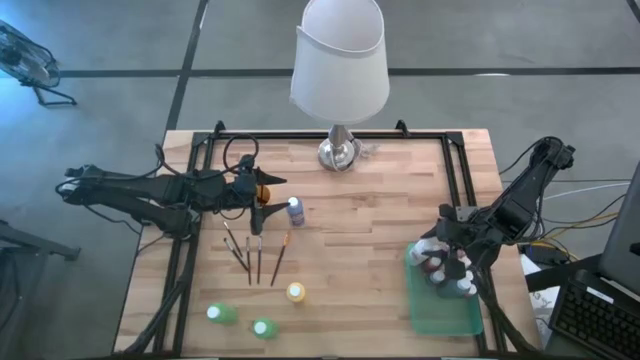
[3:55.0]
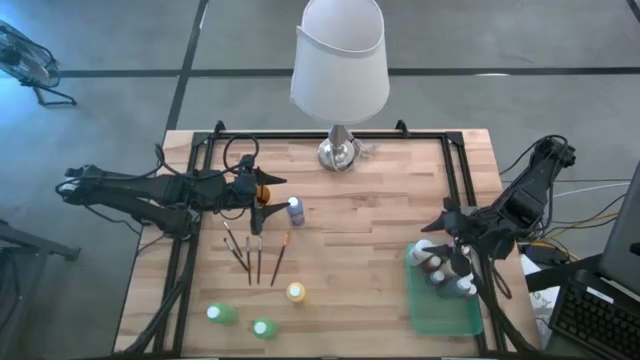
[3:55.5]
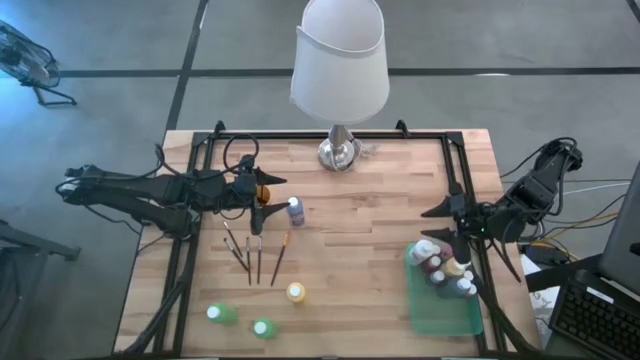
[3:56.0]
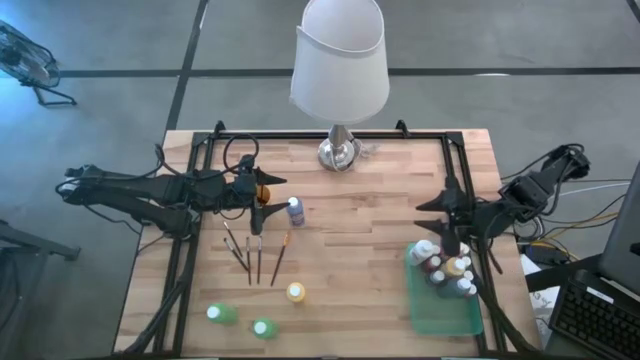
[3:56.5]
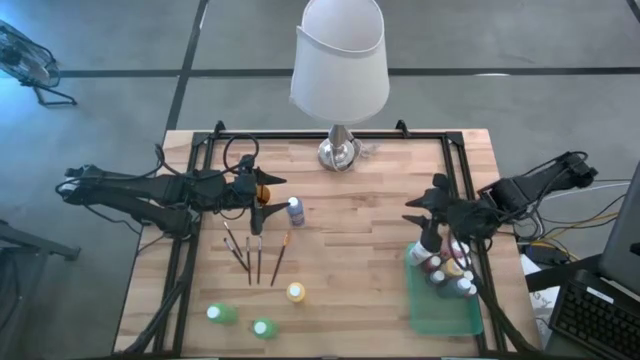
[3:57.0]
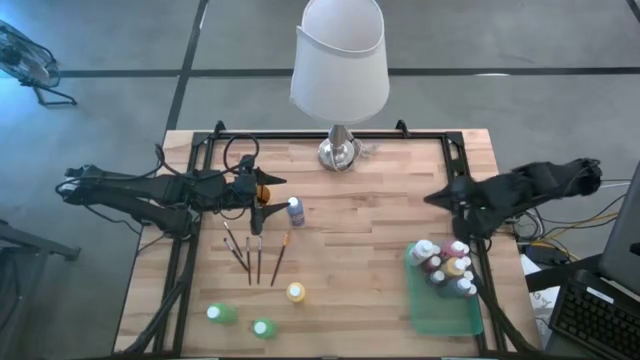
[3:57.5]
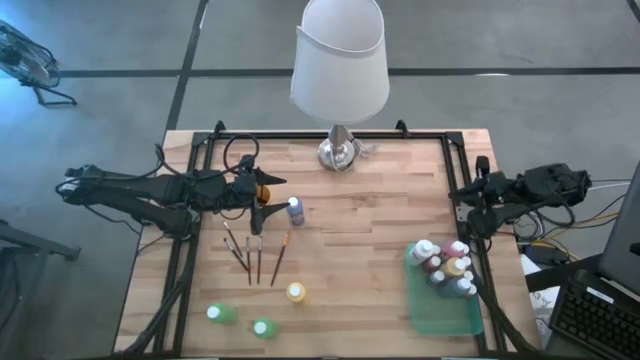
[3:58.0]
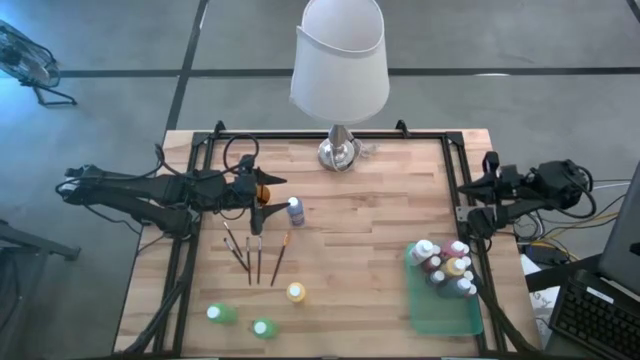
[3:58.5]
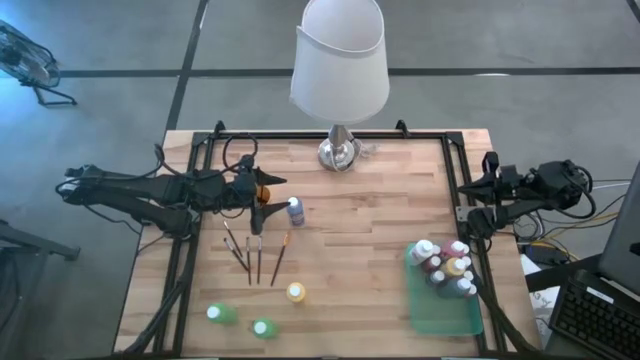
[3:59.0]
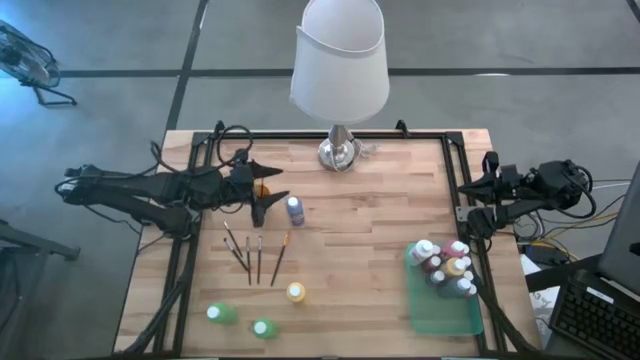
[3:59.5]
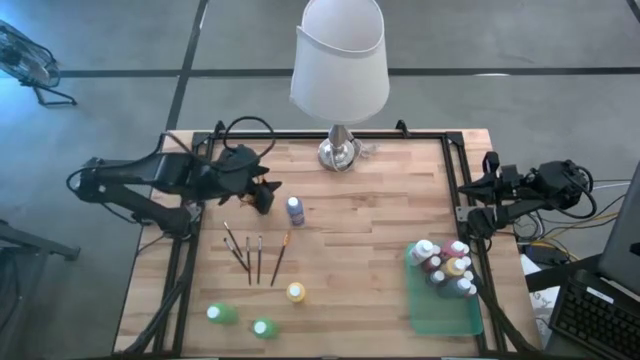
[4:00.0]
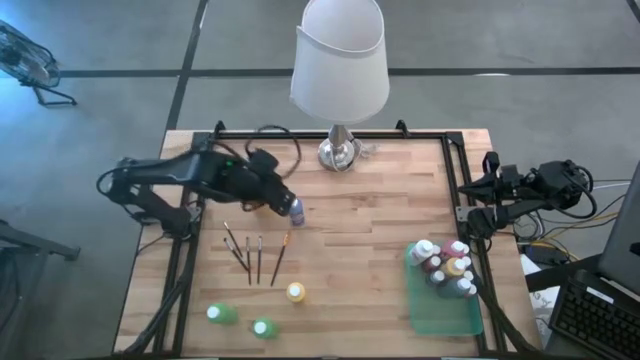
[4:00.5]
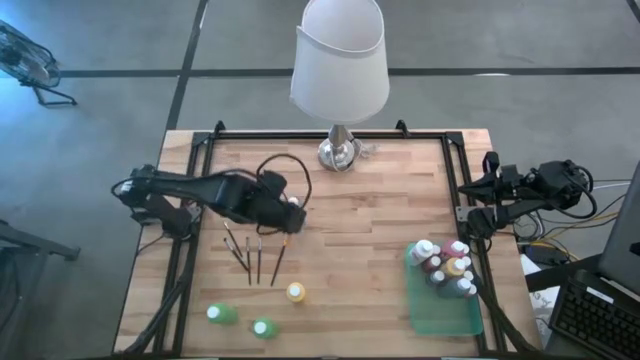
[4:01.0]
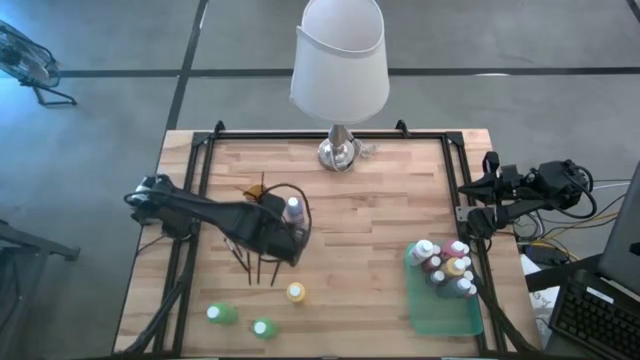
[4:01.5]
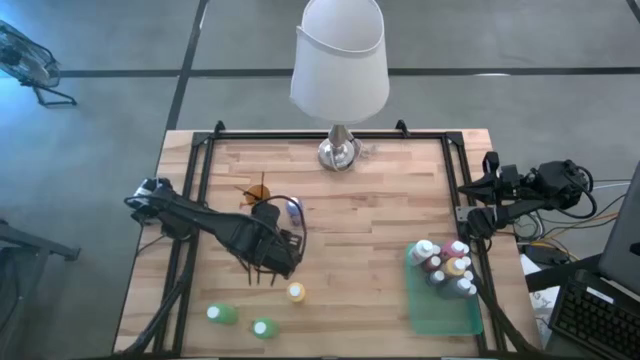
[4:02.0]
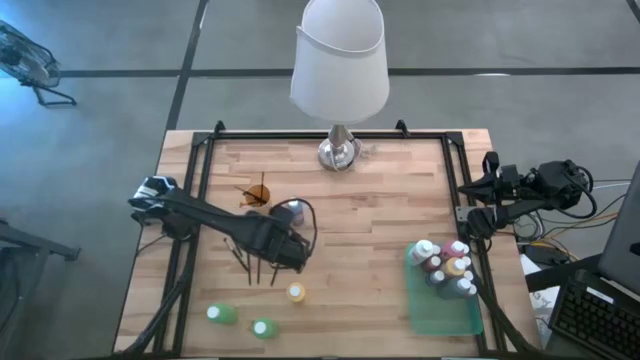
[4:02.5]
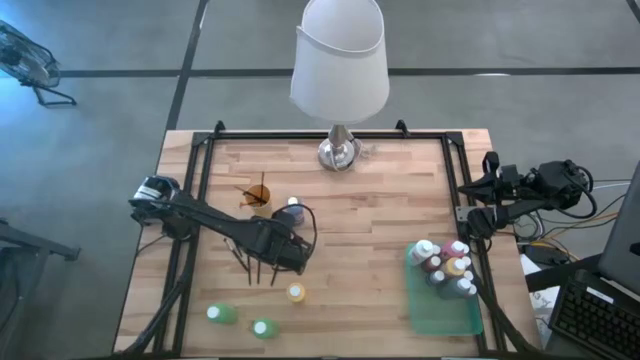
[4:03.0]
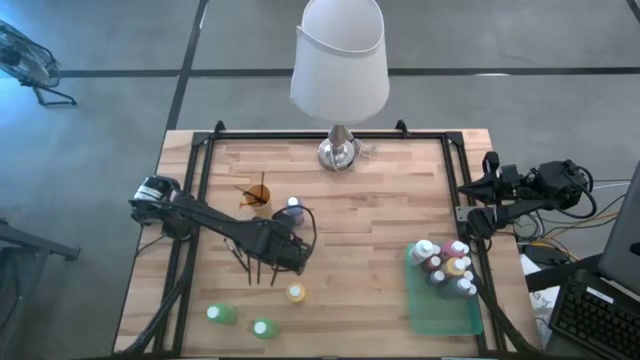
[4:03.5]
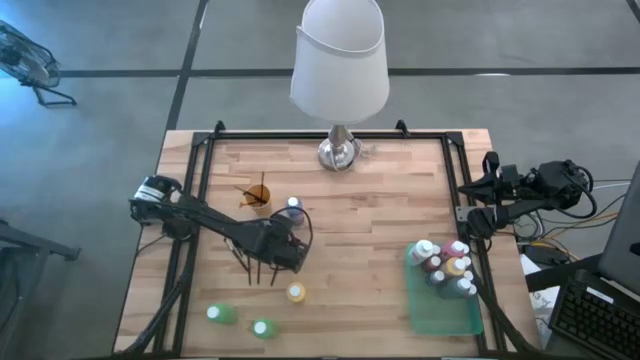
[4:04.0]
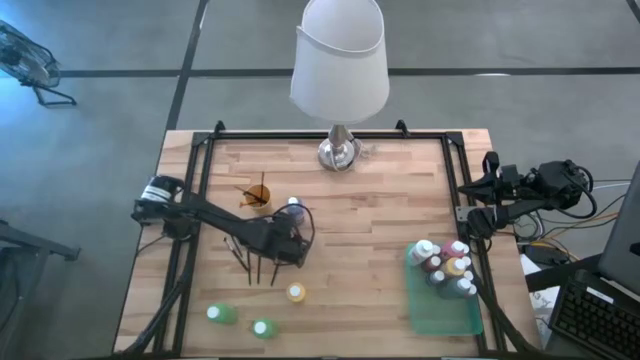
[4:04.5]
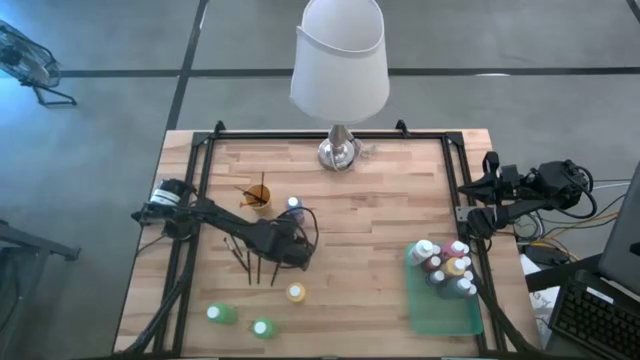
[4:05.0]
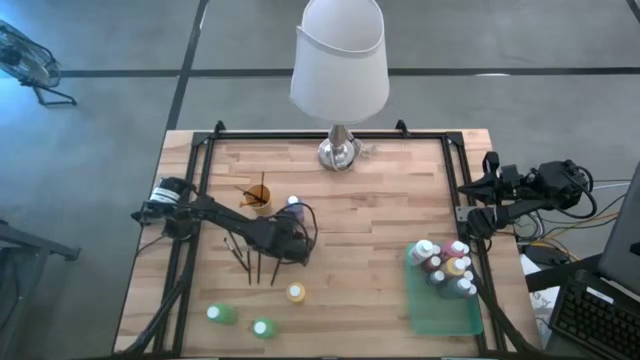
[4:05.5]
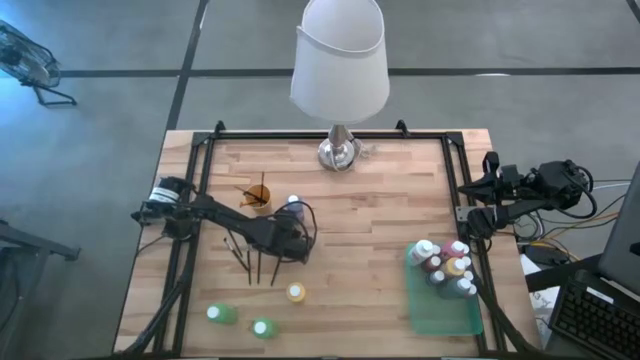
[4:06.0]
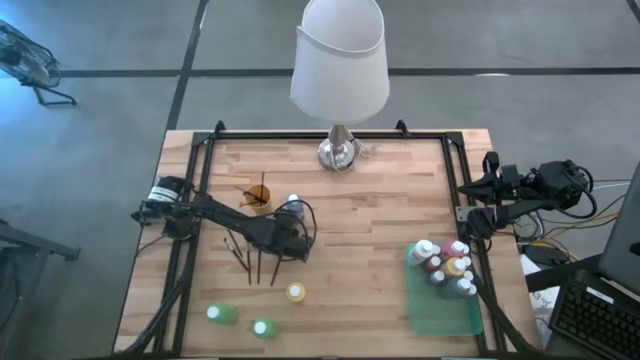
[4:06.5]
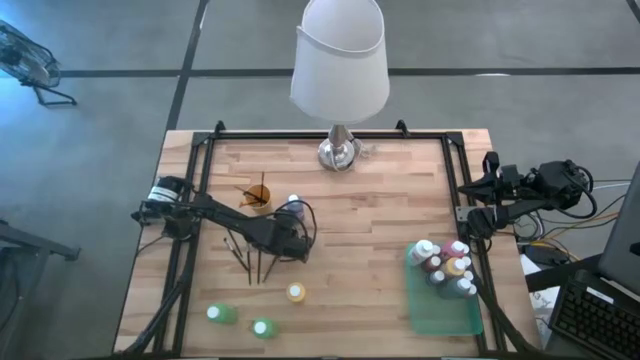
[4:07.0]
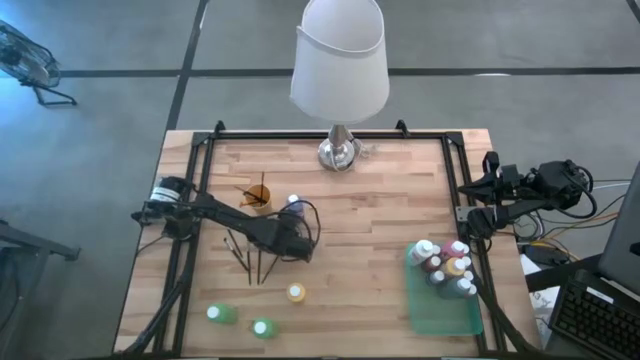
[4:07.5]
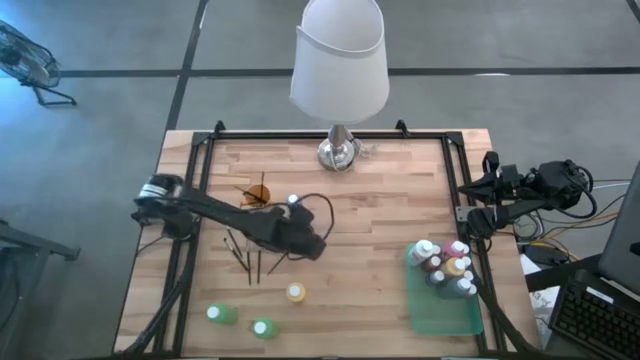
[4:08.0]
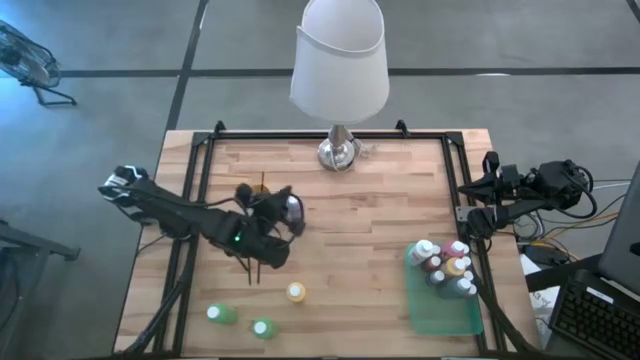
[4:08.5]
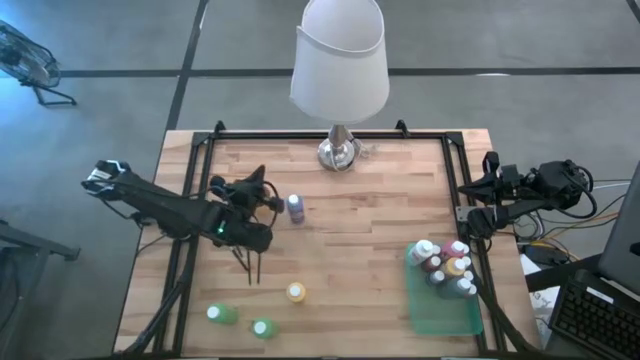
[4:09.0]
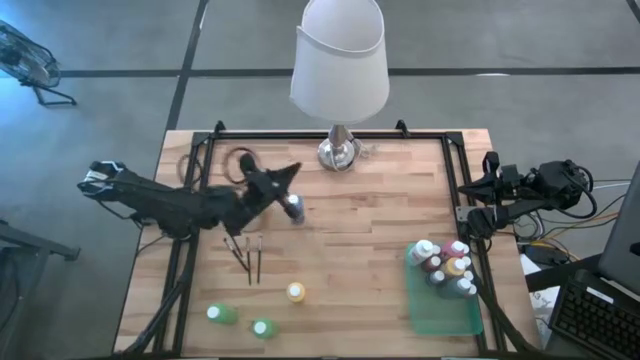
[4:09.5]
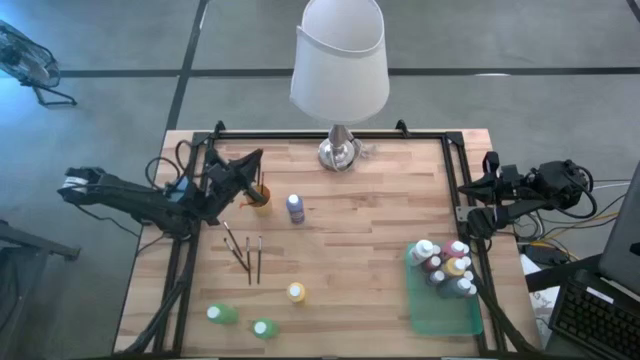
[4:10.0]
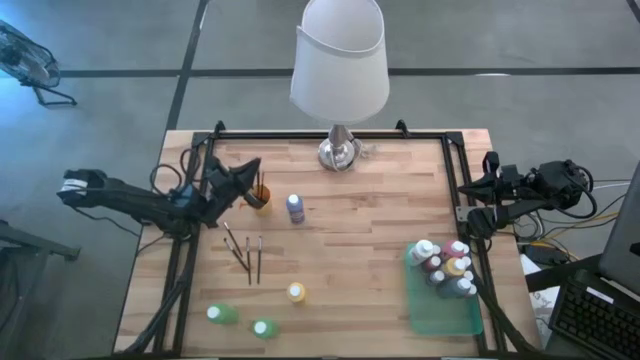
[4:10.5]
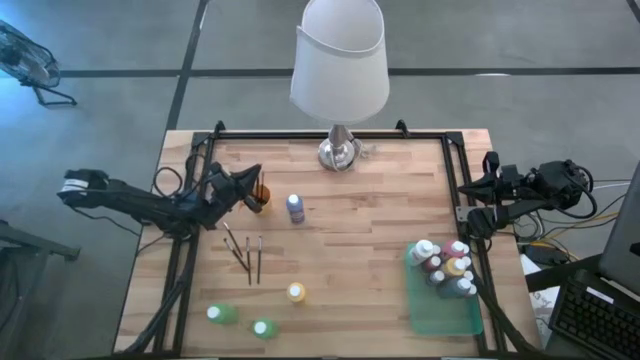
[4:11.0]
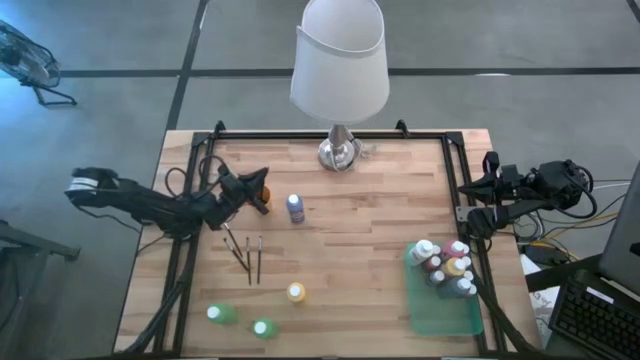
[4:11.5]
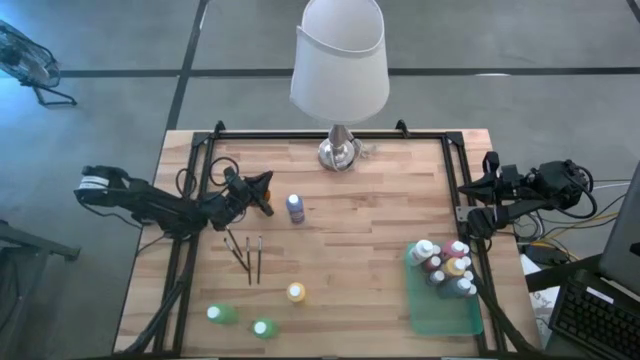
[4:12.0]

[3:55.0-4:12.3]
Task: Pick & Place Paint Supplies
Put the gold paint brush into the yellow cup
